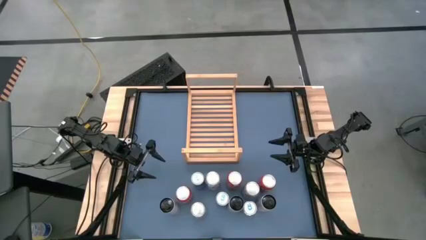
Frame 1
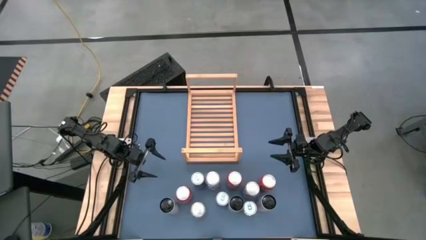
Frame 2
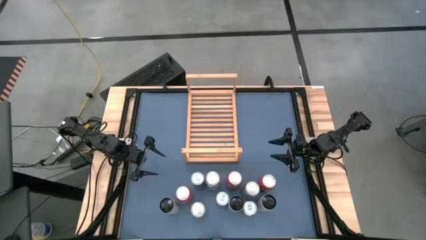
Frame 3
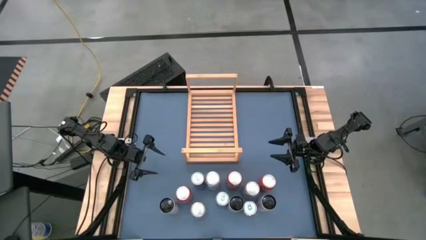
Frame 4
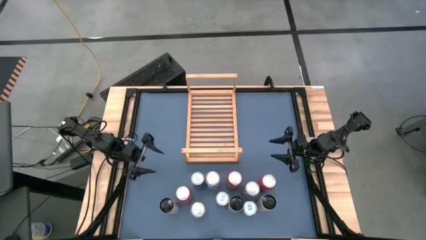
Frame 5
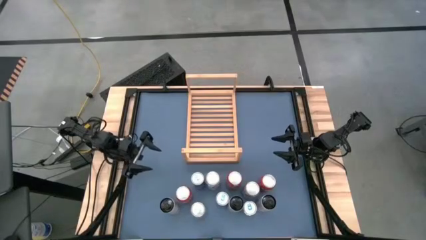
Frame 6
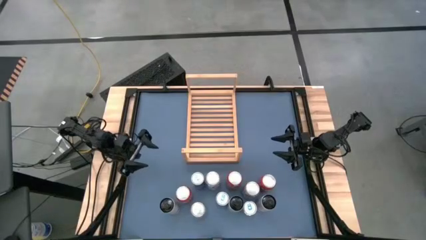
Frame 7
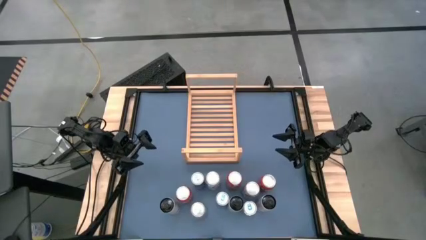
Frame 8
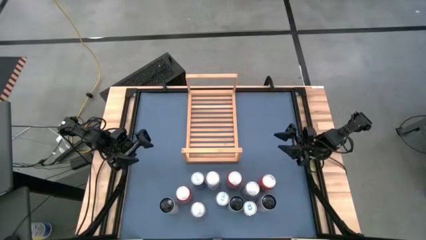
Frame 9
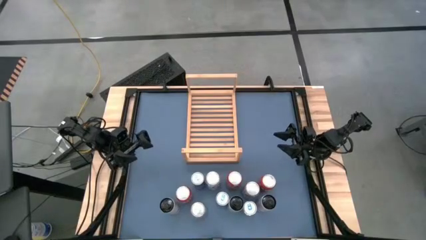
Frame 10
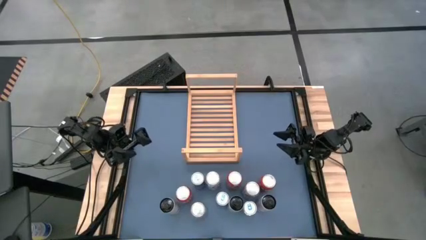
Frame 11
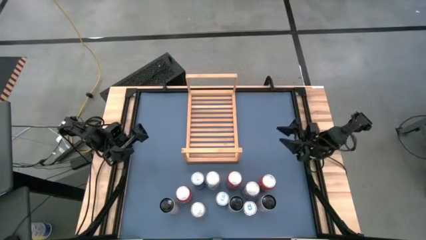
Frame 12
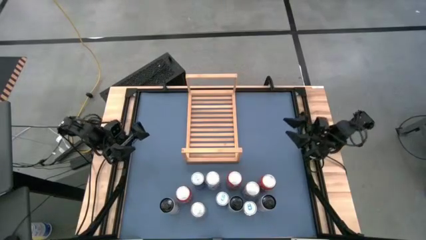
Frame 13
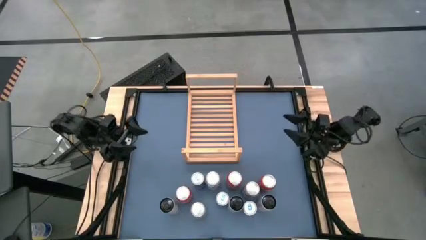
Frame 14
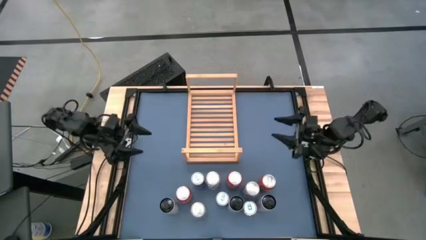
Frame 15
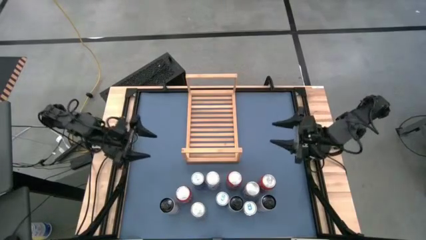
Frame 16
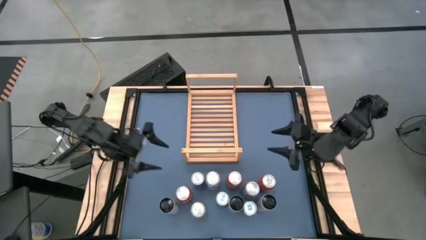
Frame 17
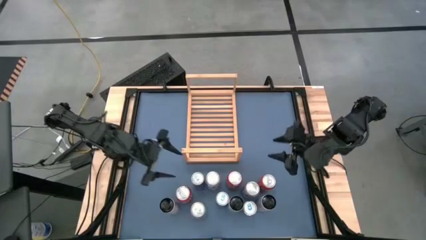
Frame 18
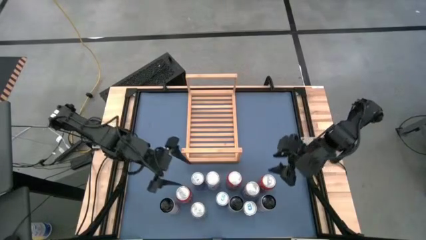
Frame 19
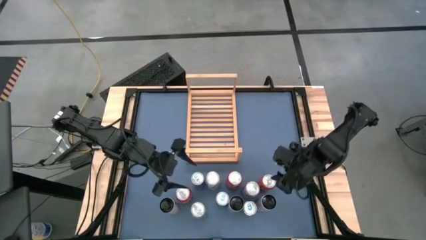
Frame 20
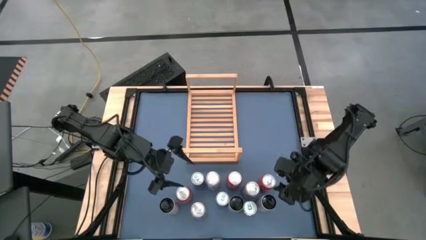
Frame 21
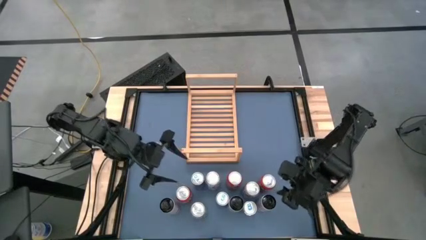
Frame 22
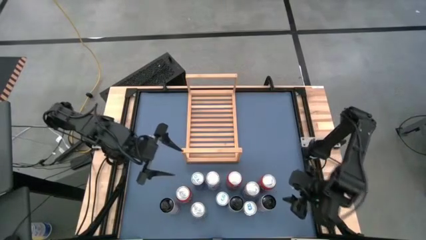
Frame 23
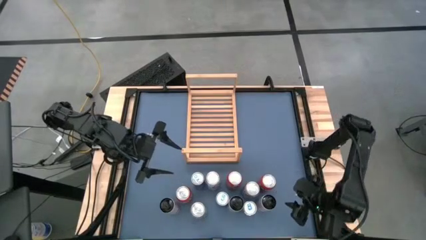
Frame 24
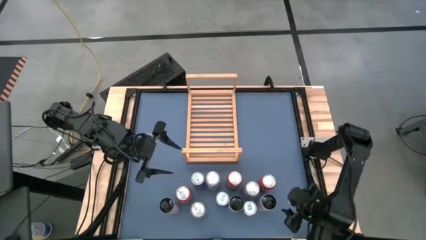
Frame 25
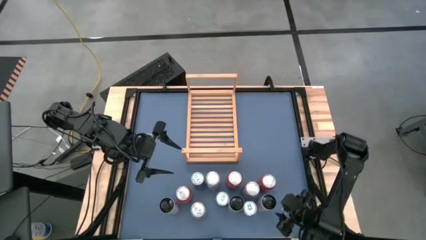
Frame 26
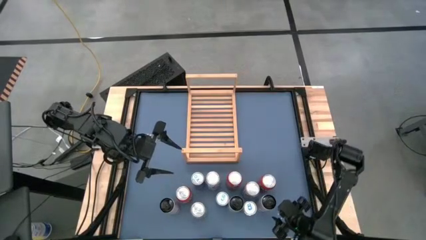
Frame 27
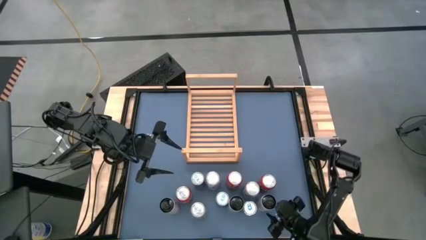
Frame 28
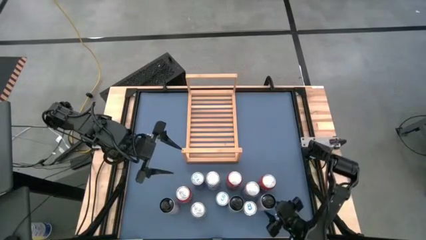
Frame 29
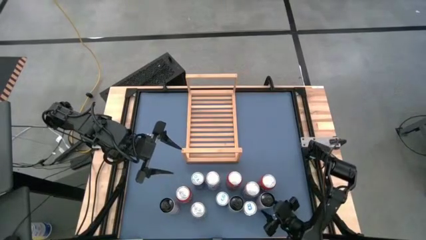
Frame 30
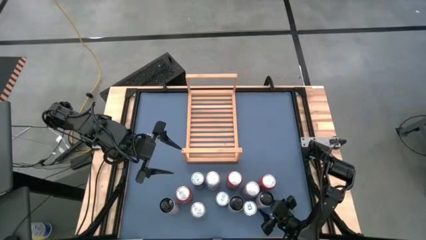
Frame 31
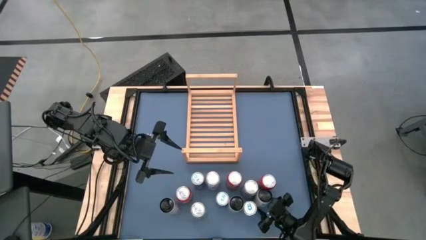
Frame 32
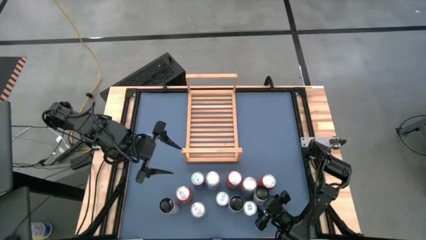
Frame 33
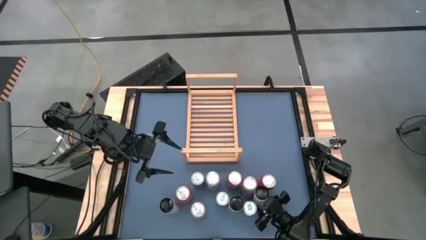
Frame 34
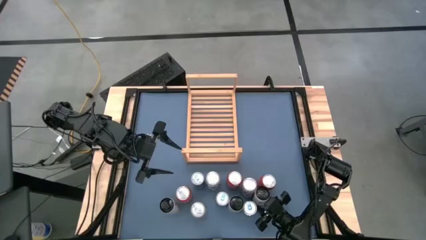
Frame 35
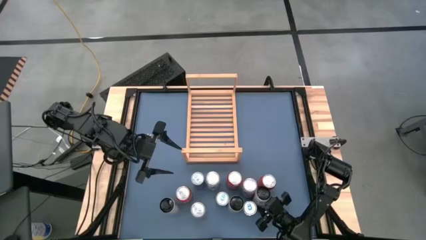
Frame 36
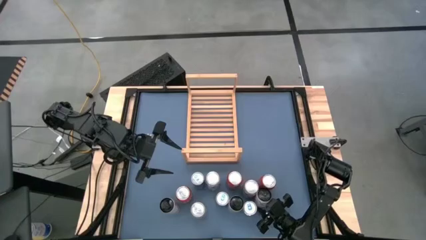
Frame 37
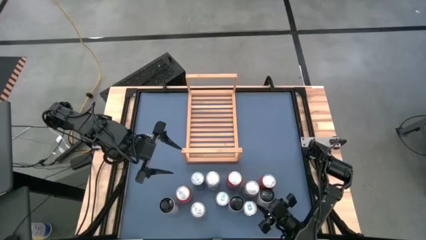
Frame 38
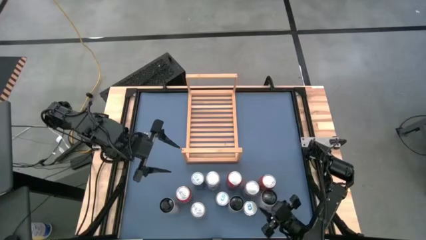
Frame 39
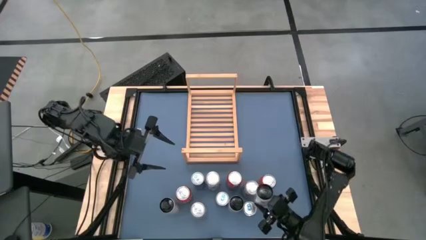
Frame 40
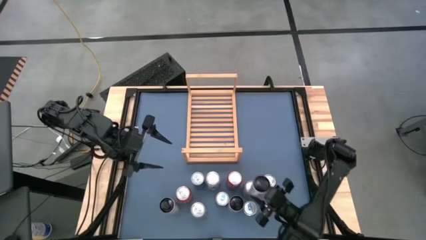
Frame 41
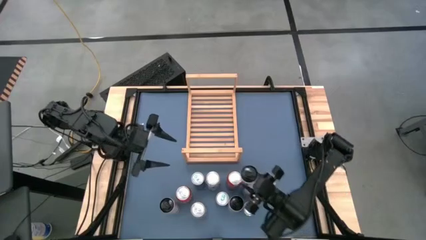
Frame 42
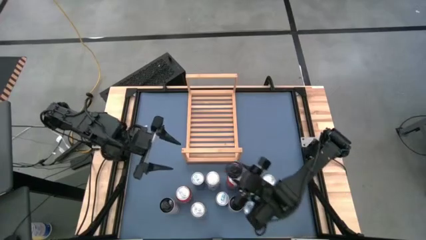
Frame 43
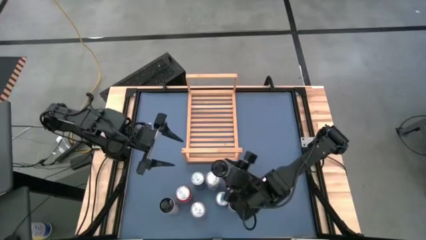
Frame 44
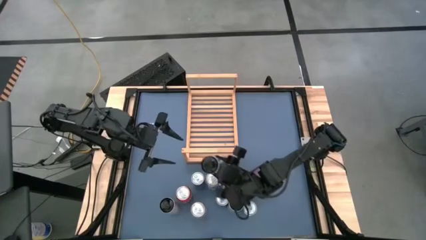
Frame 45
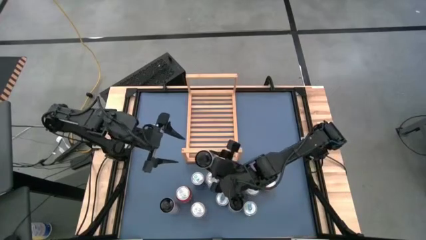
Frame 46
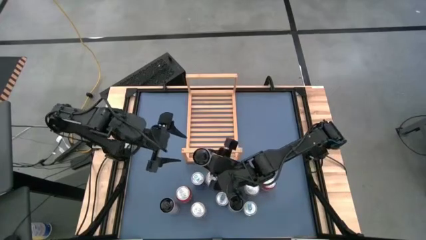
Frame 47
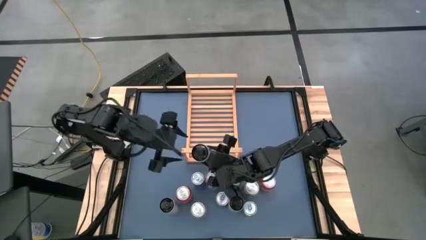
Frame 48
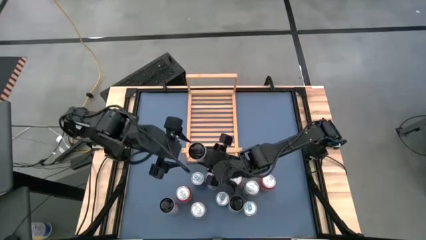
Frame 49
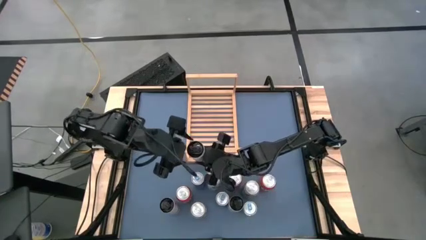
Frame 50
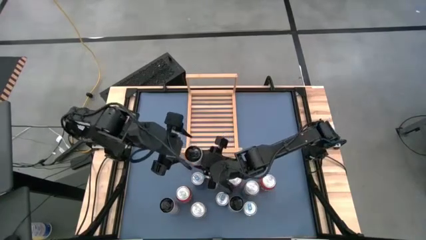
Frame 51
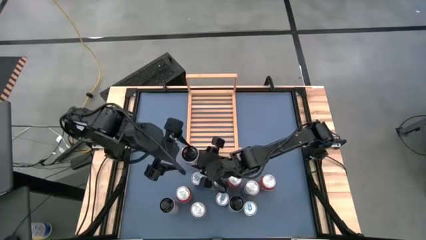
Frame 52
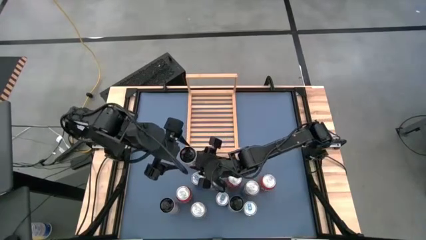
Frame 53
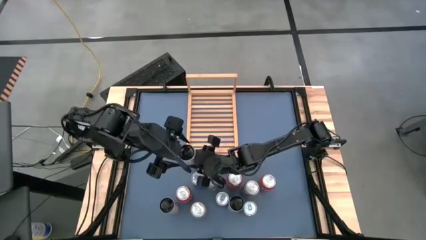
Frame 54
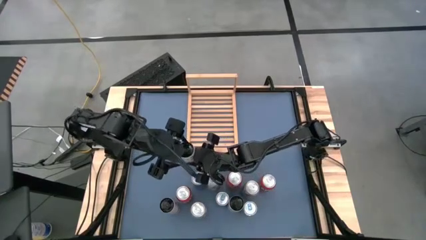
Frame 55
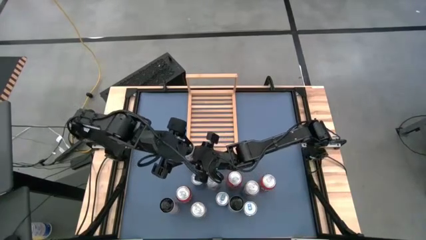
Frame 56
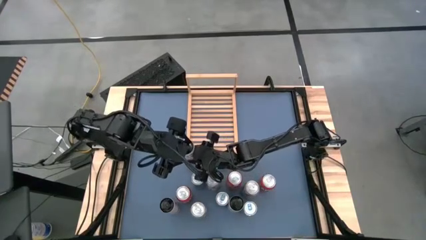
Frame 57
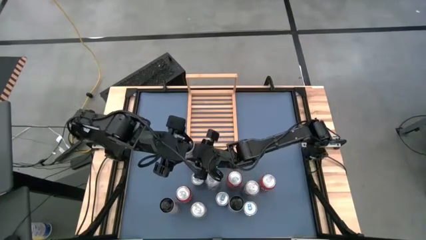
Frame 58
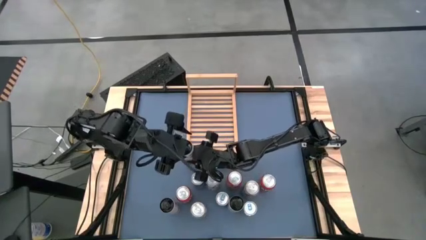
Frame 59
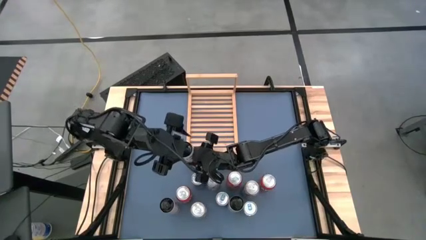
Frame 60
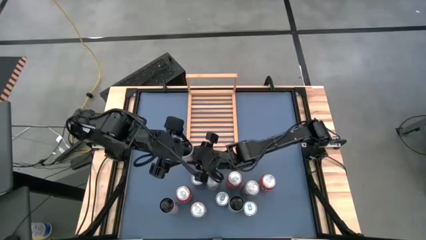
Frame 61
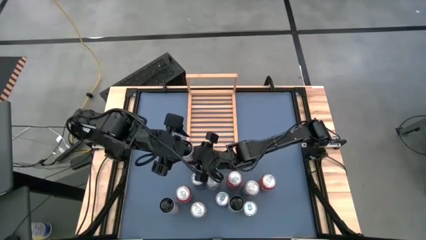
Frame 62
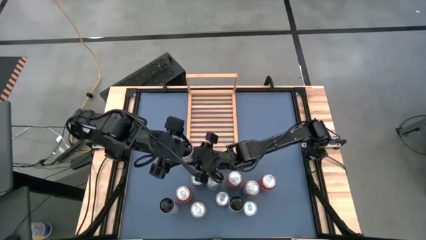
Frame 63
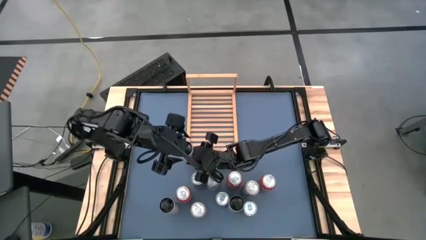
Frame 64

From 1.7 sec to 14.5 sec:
Task: Place canned beverage on shelf
Put the right white soda can on the shelf
